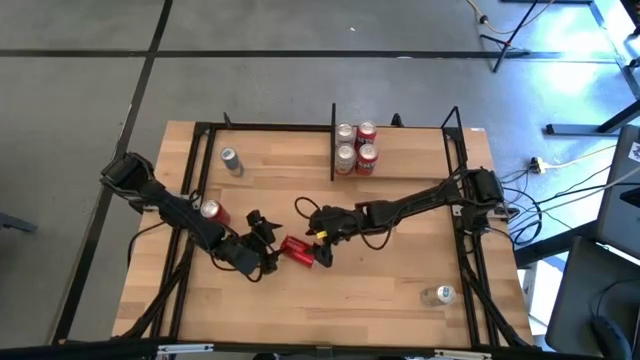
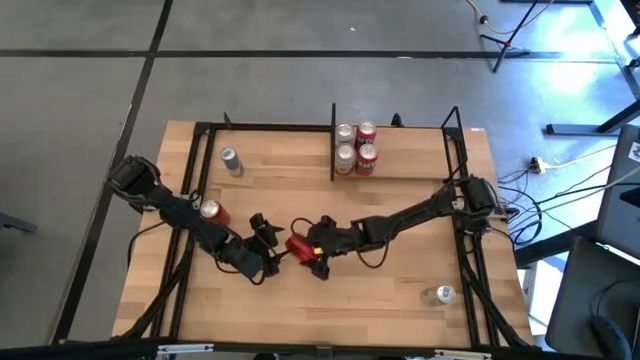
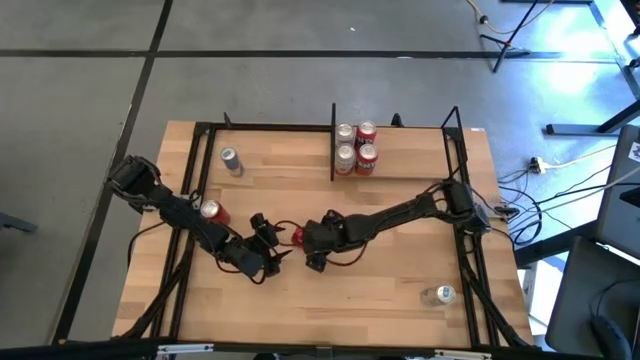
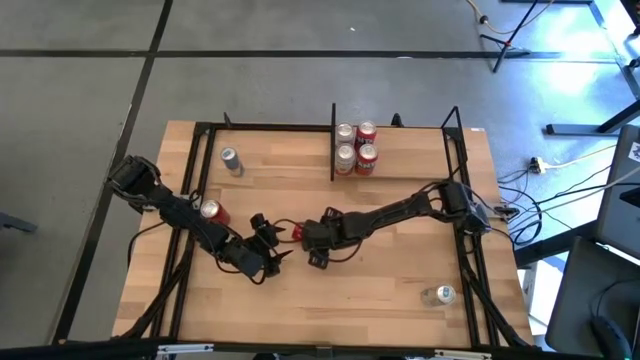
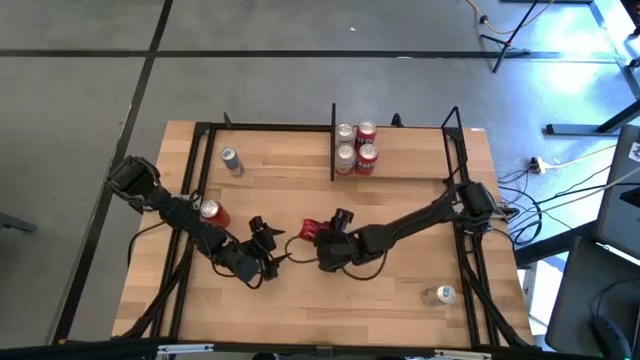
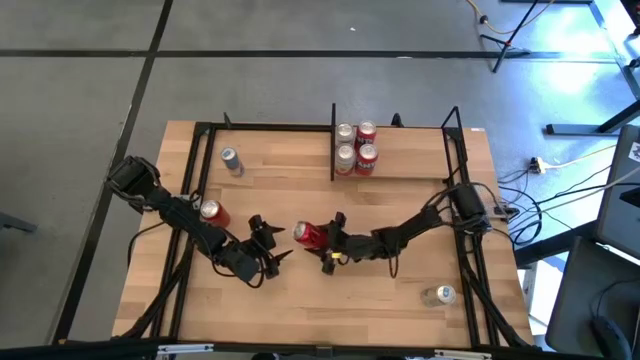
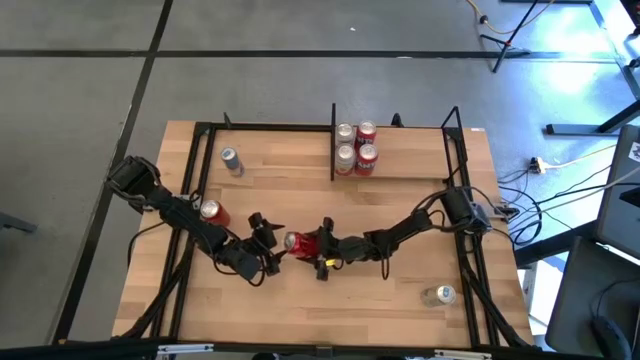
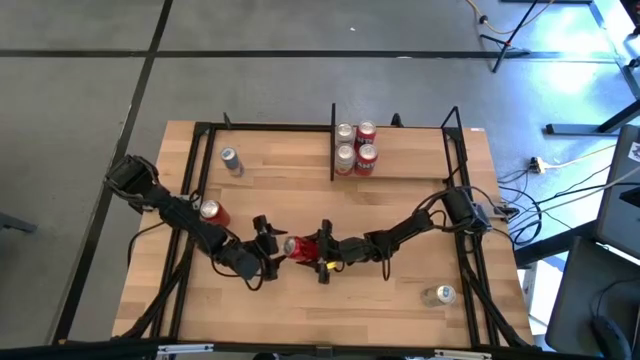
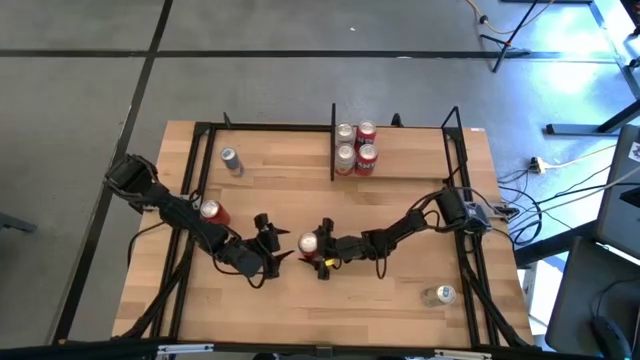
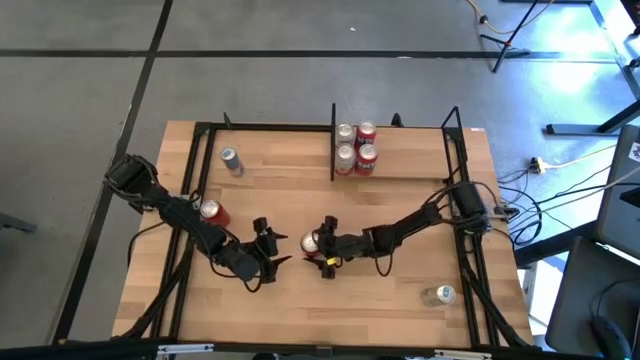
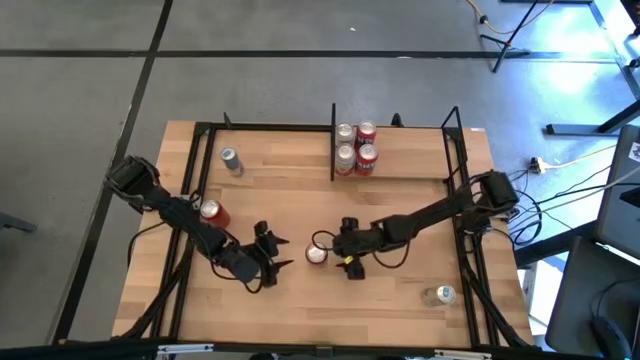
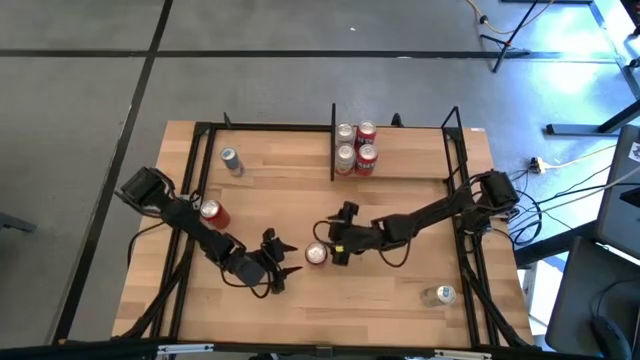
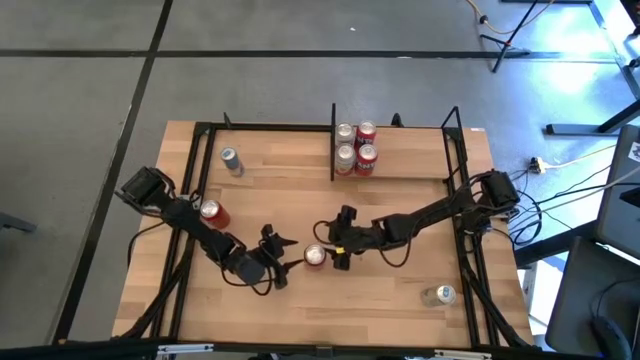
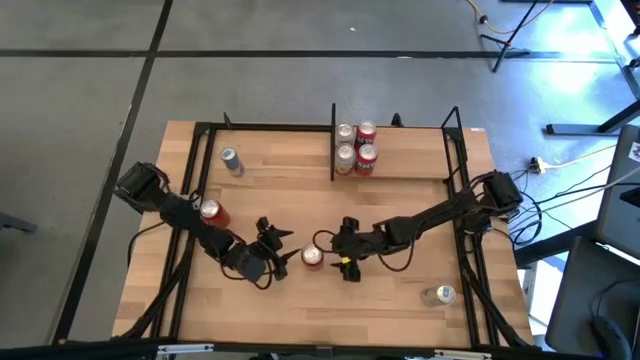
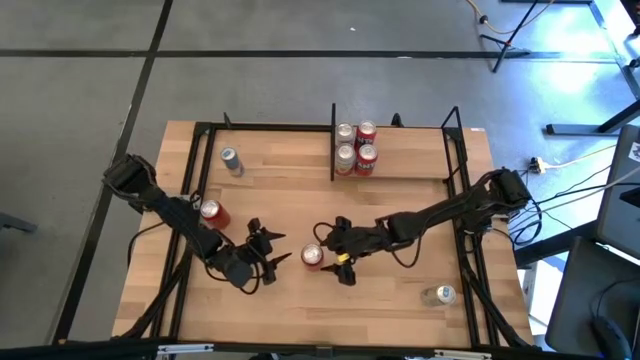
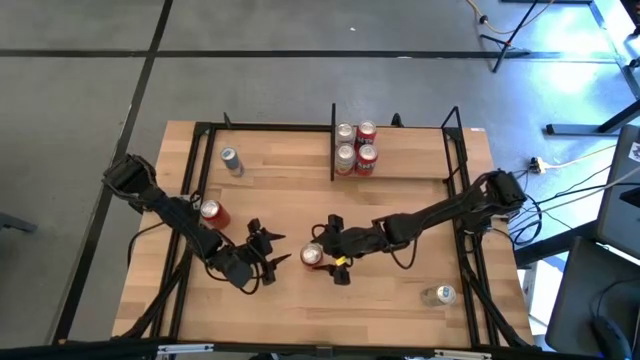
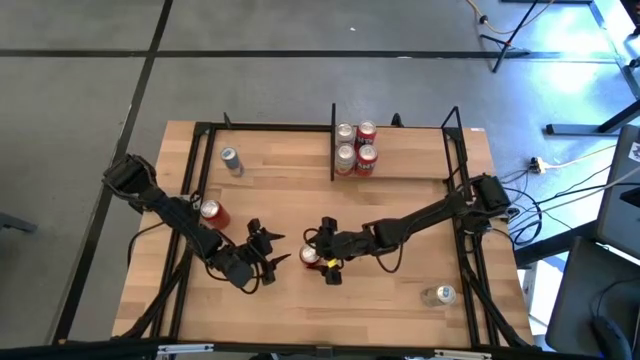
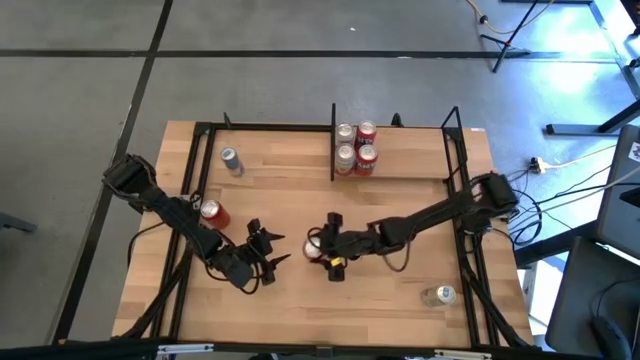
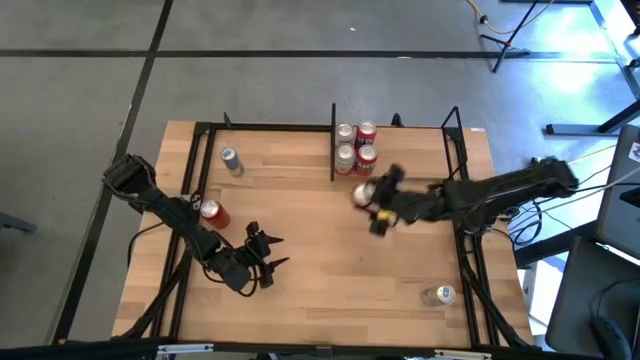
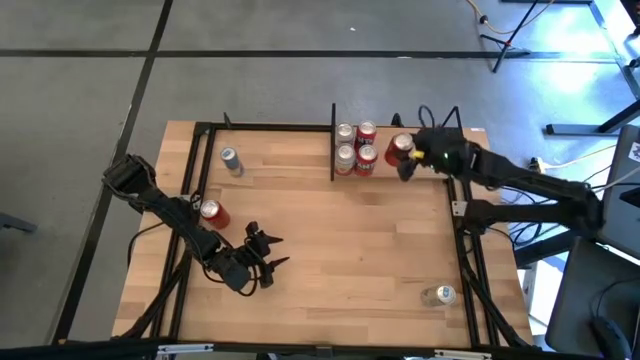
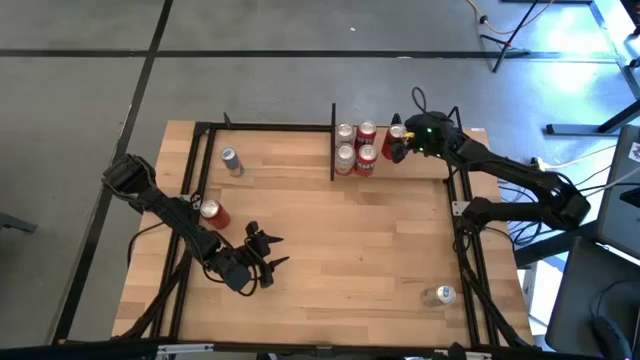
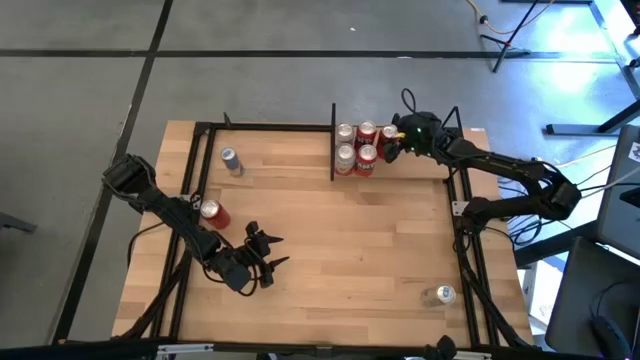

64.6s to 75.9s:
Task: Place canned beverage on shelf
Put the right red black soda can on the shelf

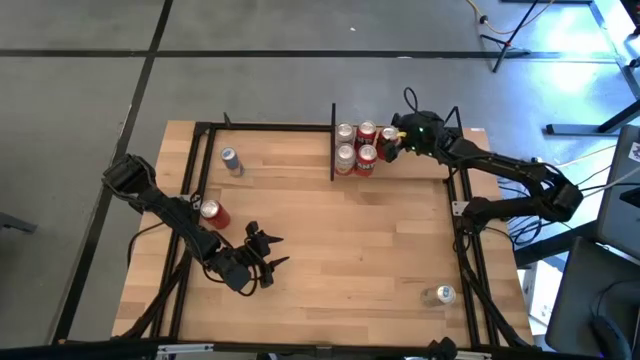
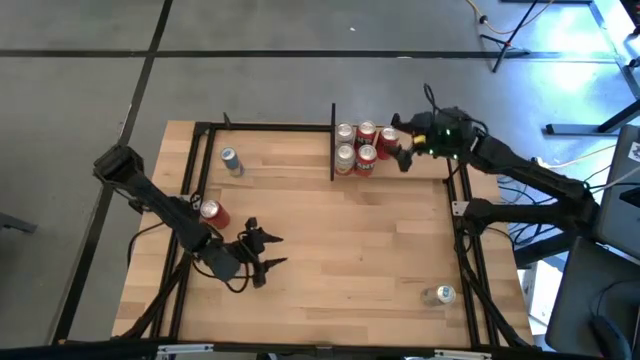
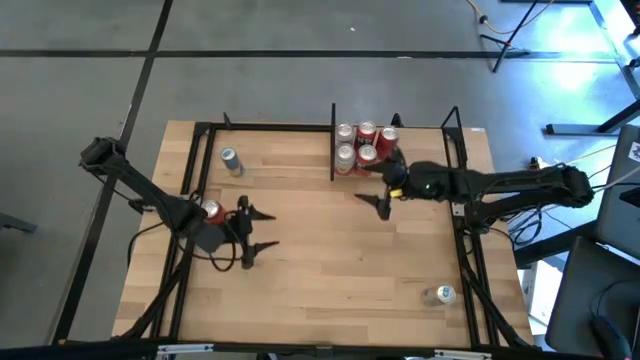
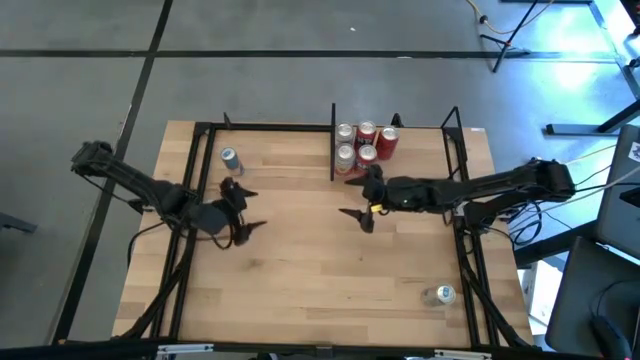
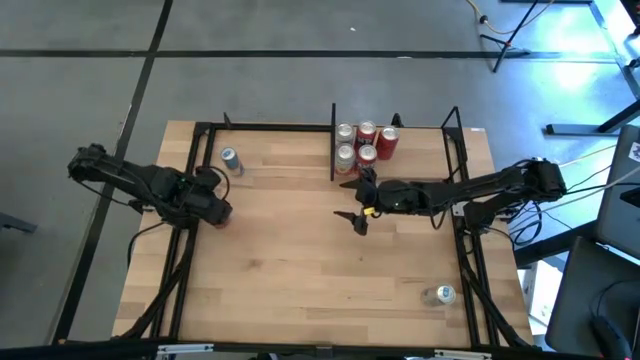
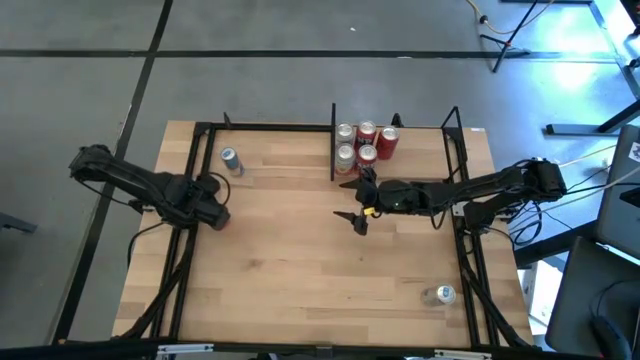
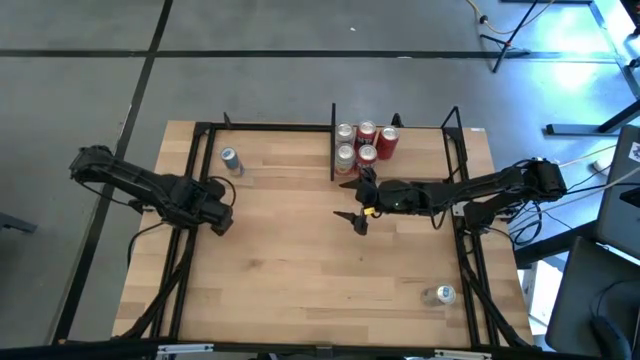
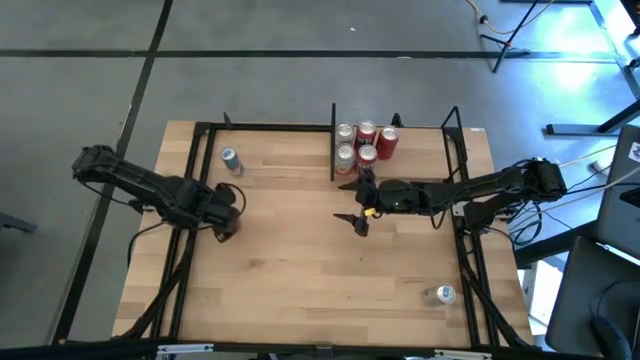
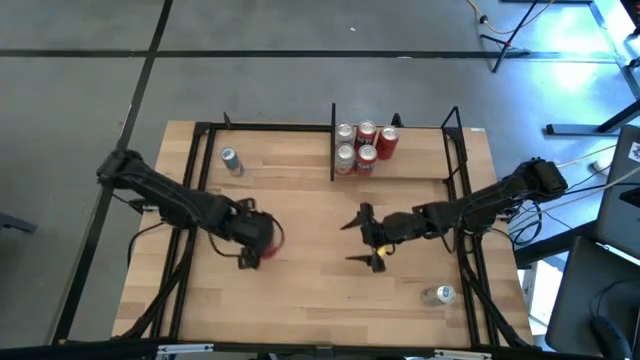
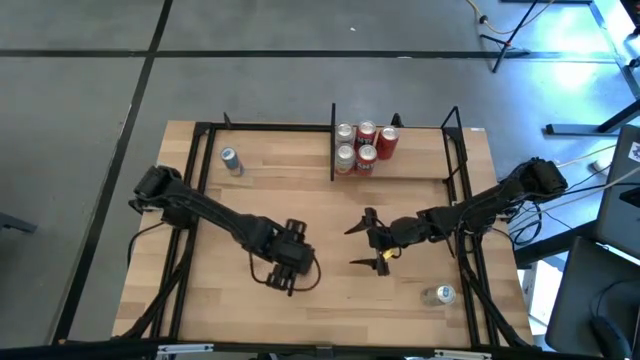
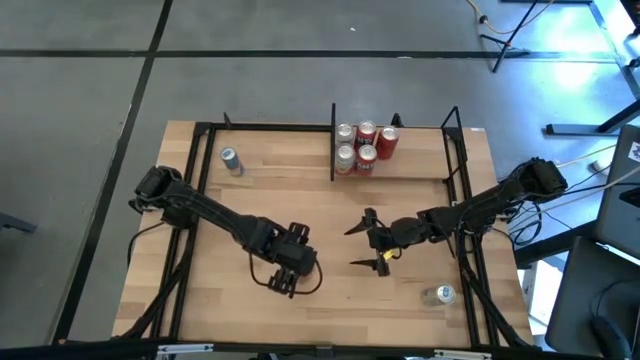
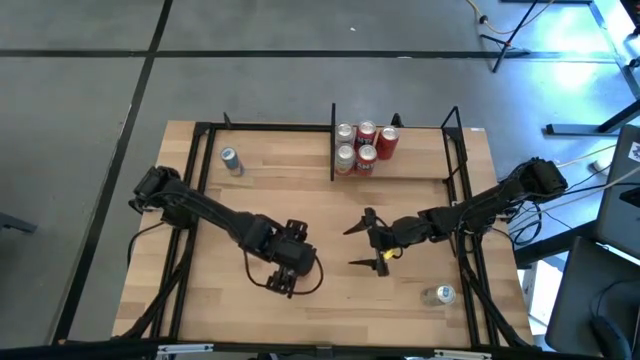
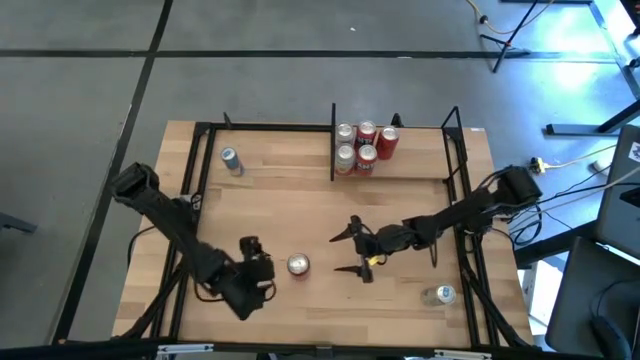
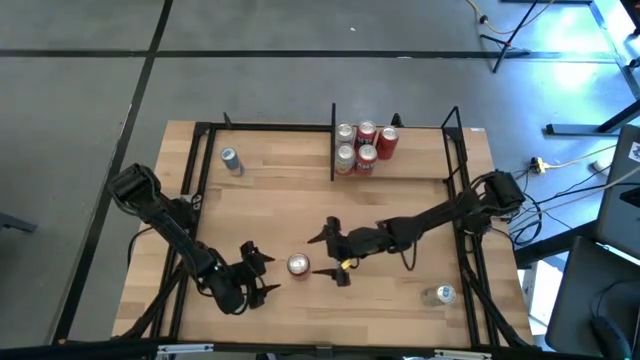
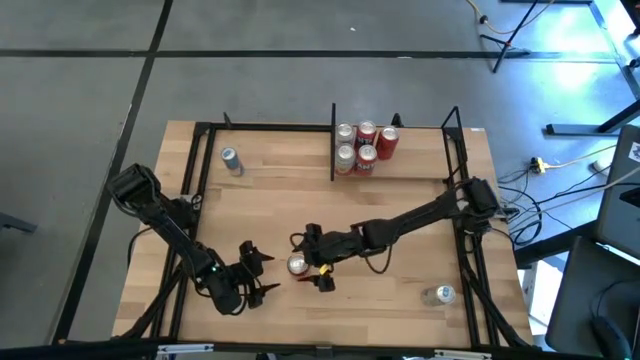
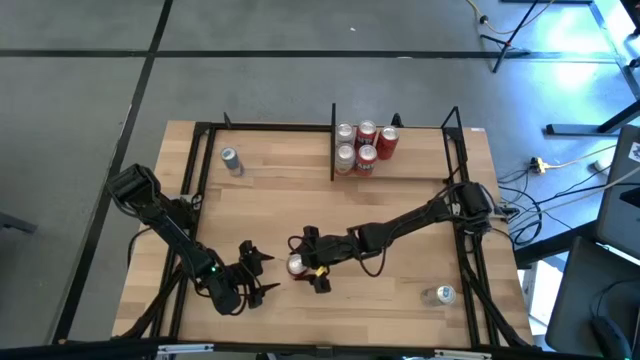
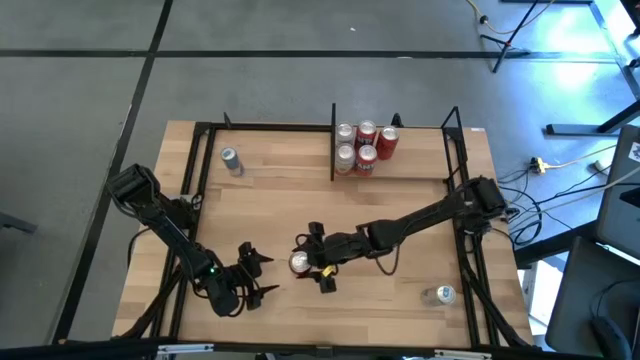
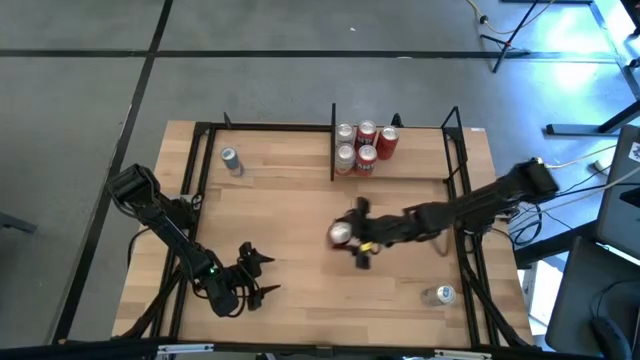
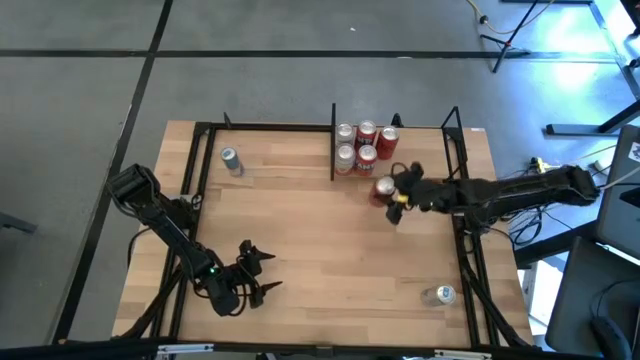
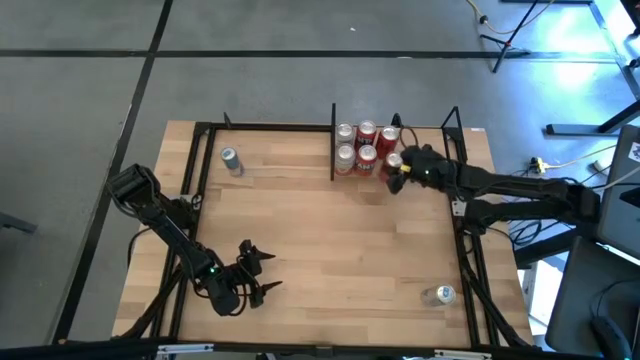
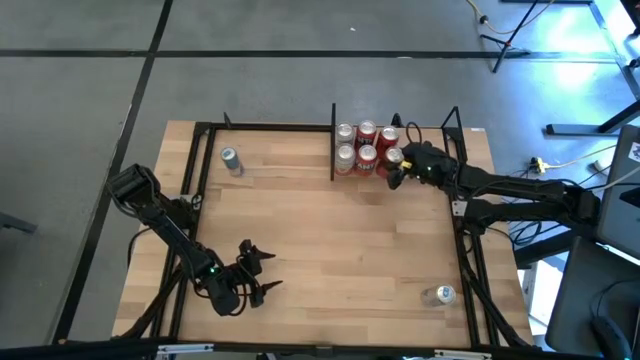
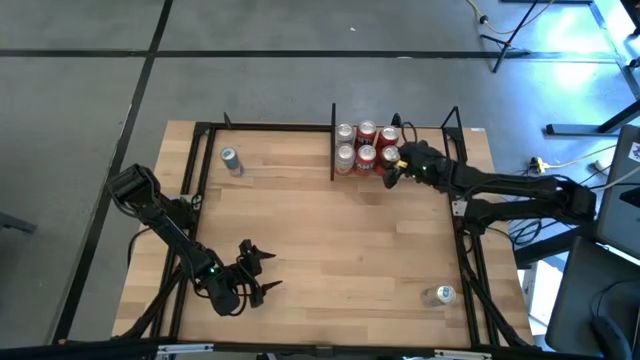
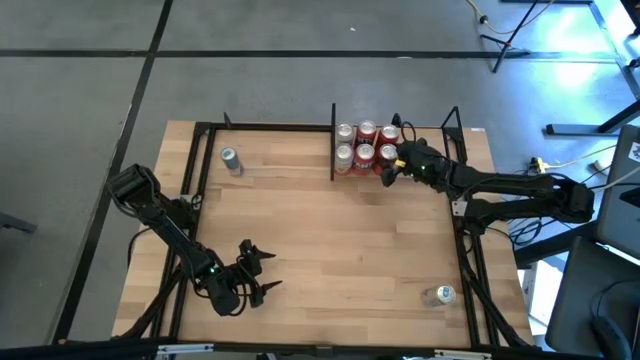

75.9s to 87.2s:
Put the red black soda can on the shelf aligned with the other red black soda can
